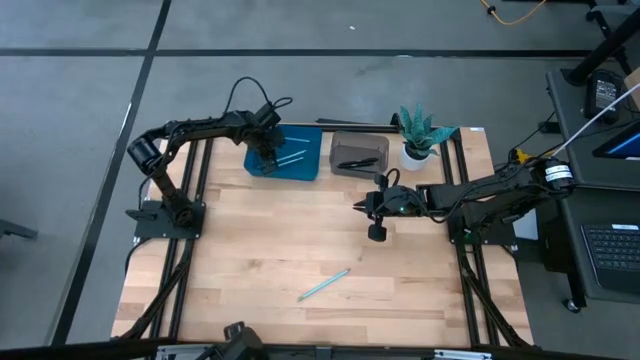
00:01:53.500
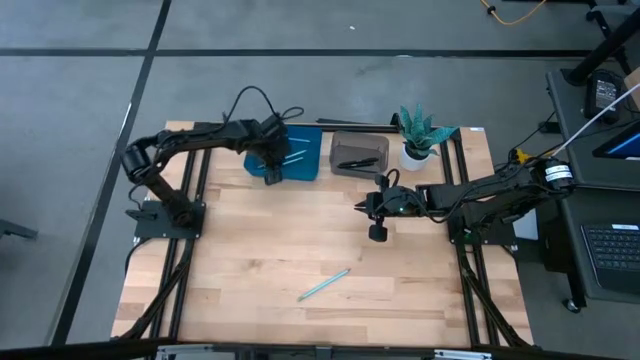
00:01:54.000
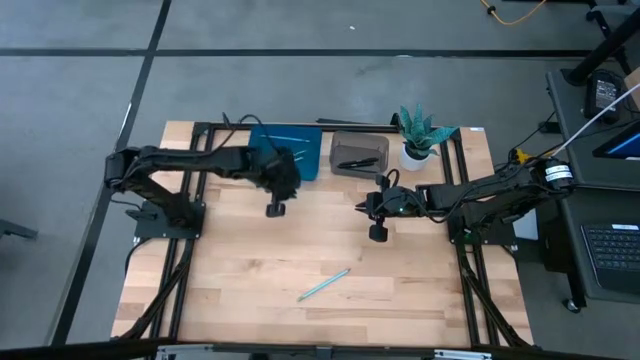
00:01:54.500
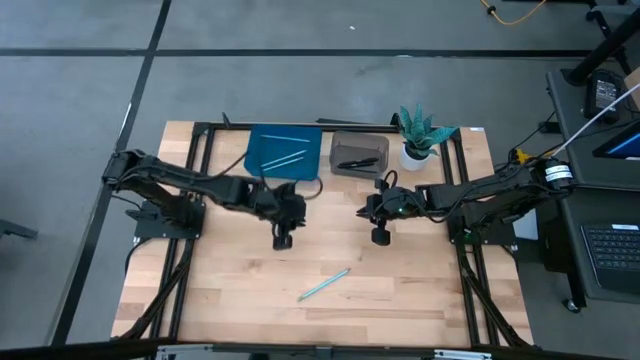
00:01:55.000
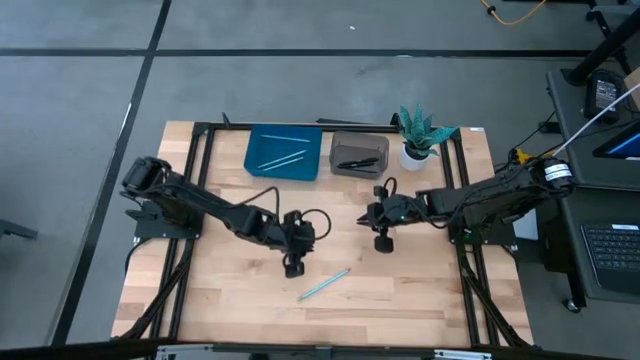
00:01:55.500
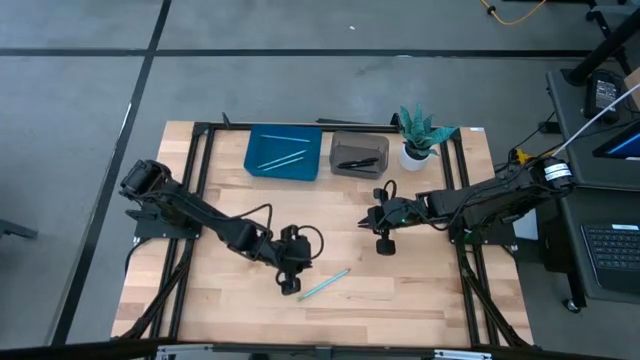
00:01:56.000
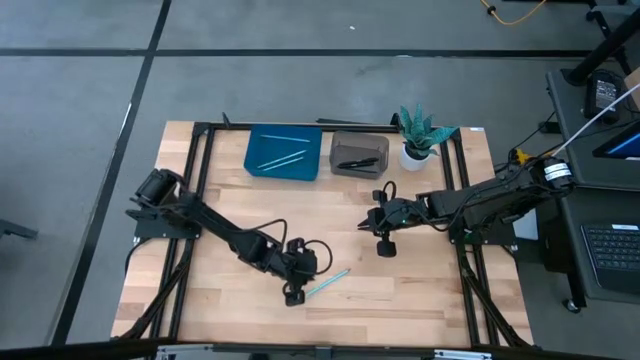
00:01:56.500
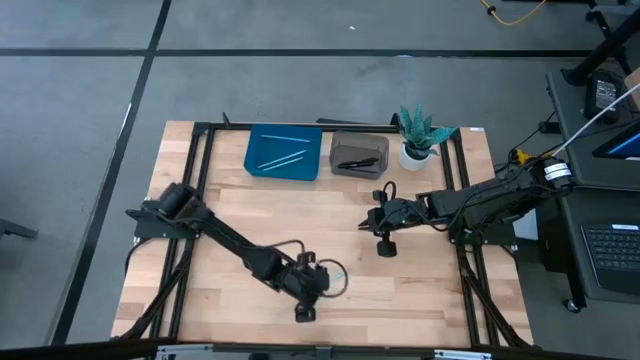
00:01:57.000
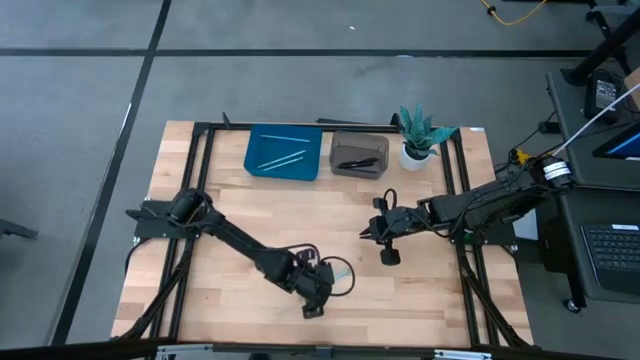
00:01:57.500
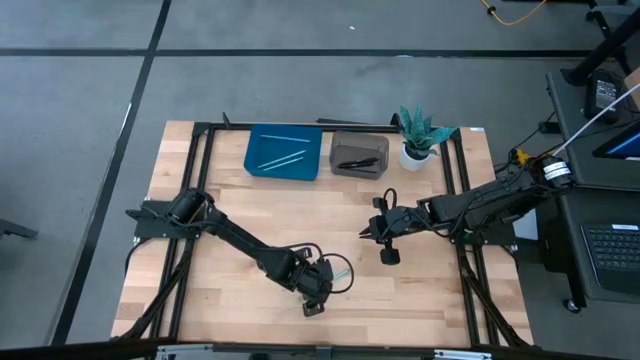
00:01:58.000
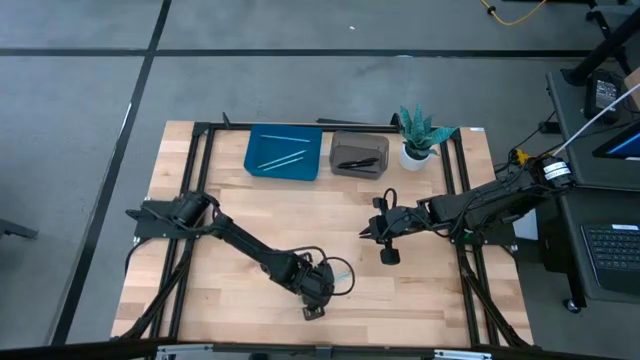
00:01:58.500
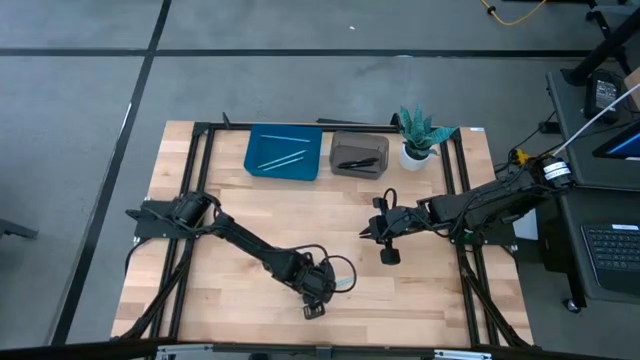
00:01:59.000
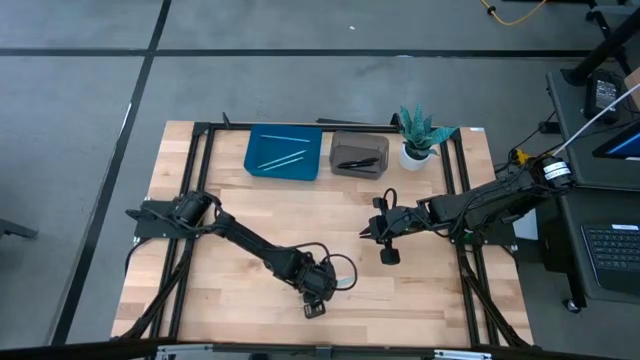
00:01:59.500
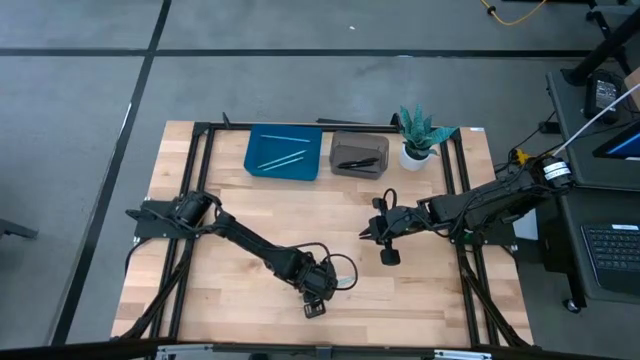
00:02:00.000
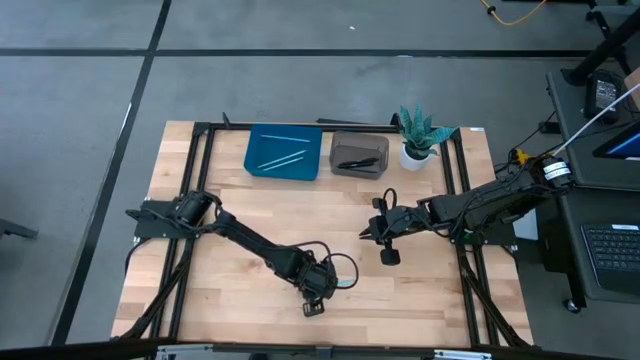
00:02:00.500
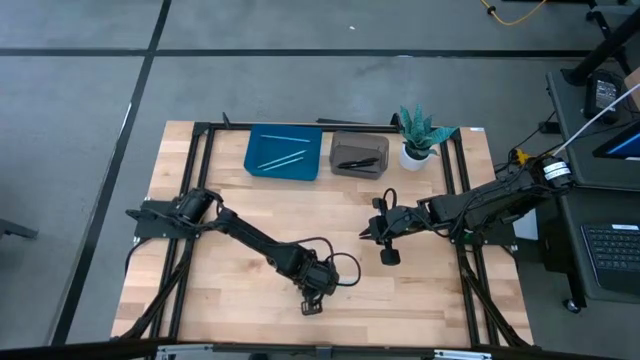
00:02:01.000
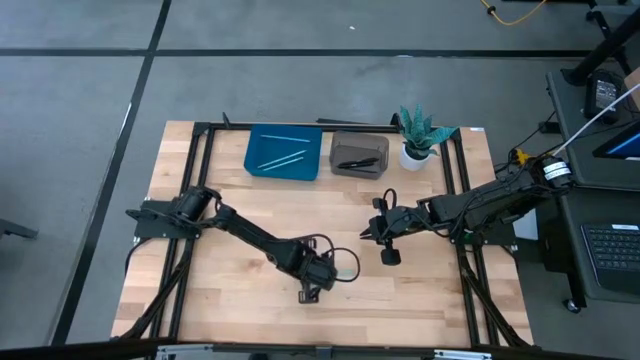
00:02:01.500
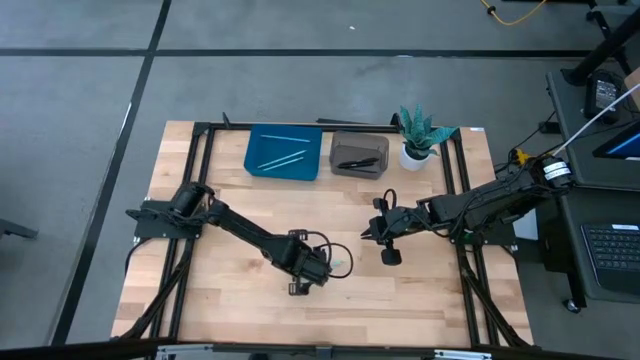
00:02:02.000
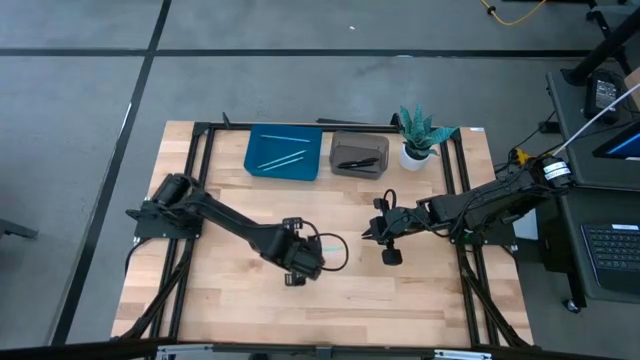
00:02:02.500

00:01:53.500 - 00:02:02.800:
Task: Sort pens & pencils
Put the light green pencil into the blue bin

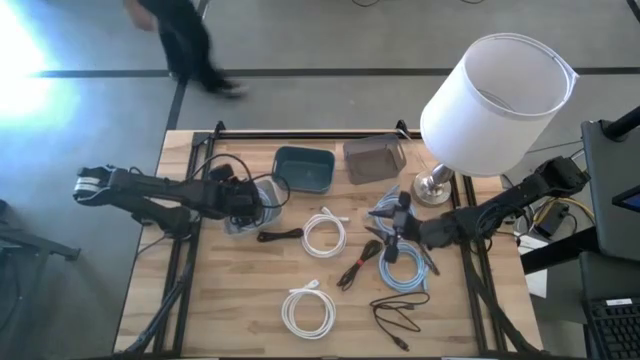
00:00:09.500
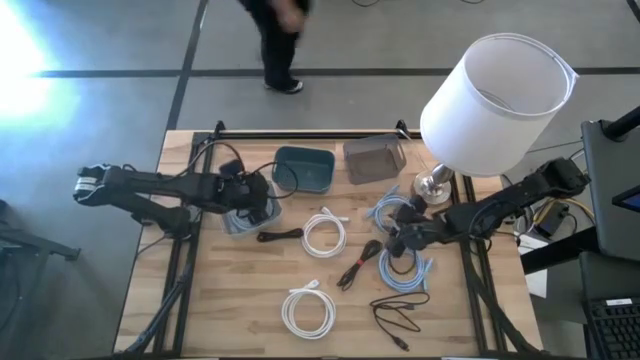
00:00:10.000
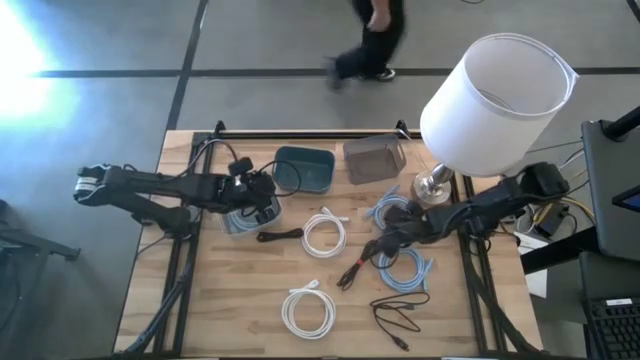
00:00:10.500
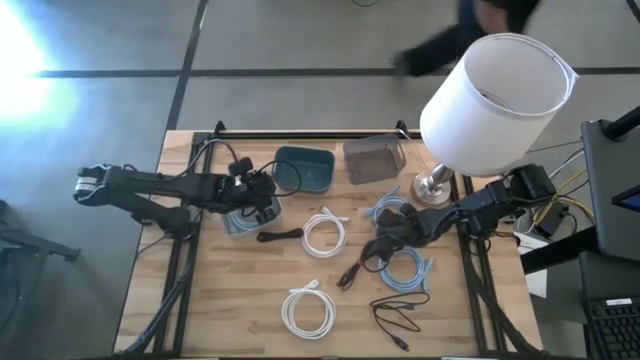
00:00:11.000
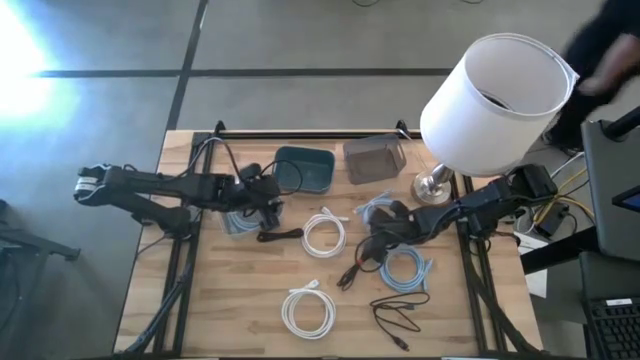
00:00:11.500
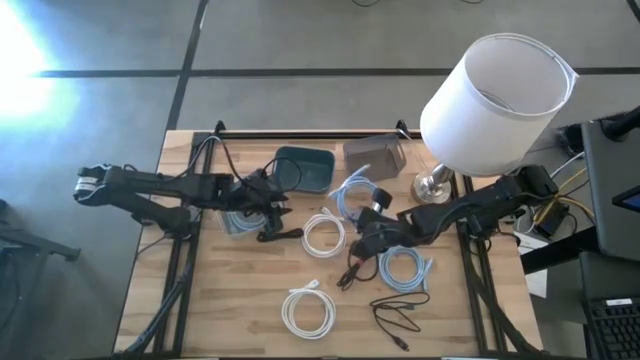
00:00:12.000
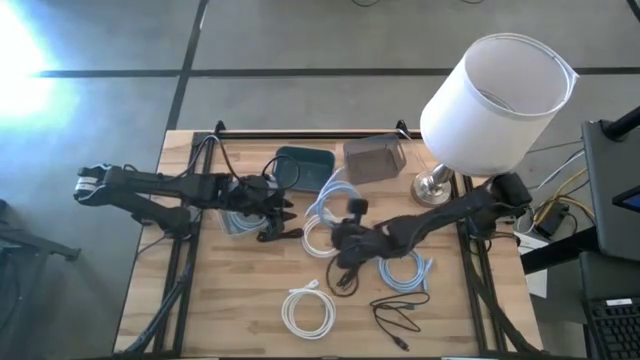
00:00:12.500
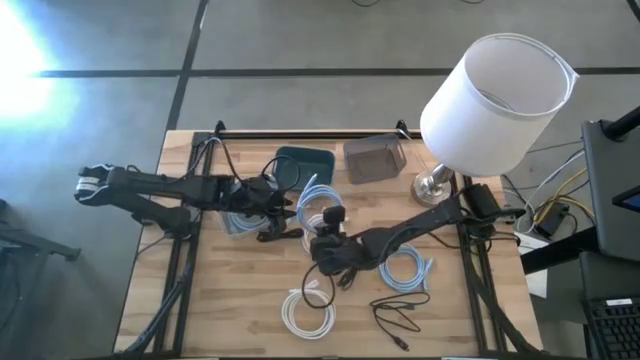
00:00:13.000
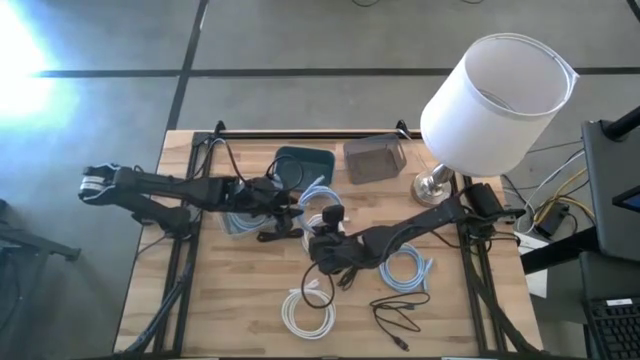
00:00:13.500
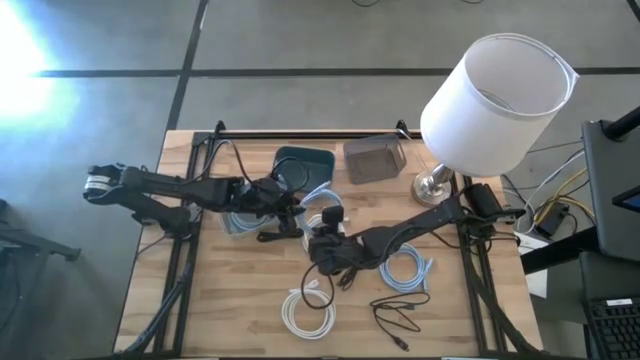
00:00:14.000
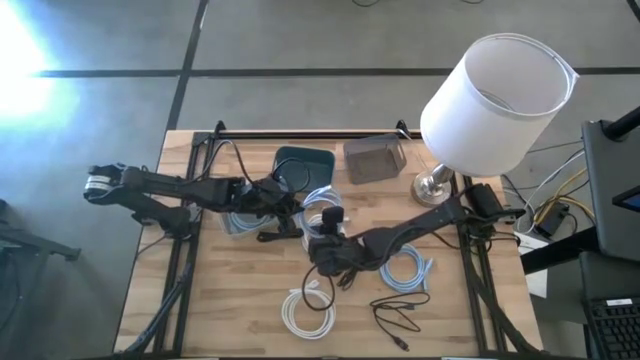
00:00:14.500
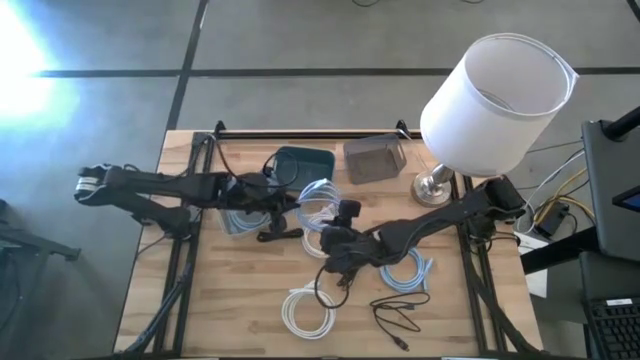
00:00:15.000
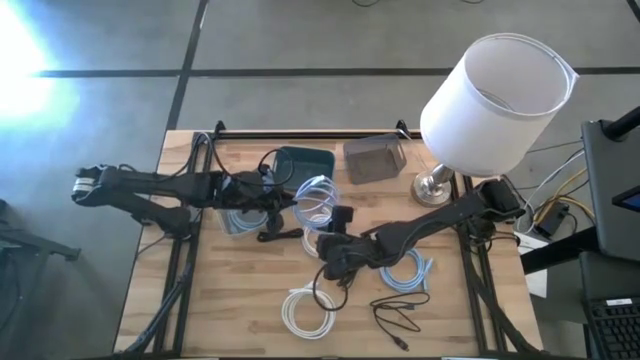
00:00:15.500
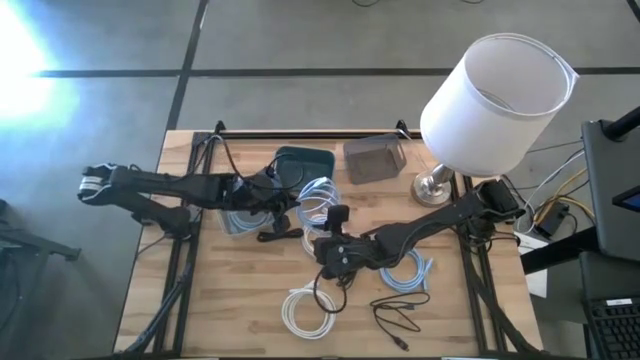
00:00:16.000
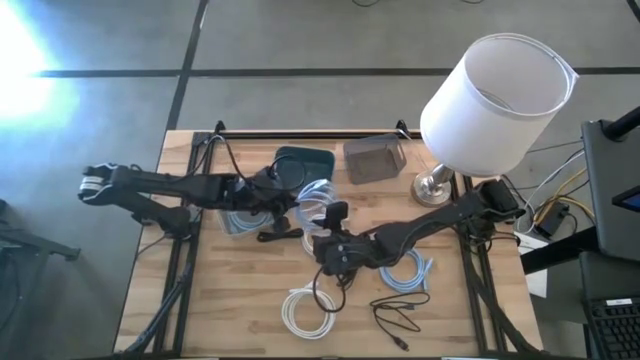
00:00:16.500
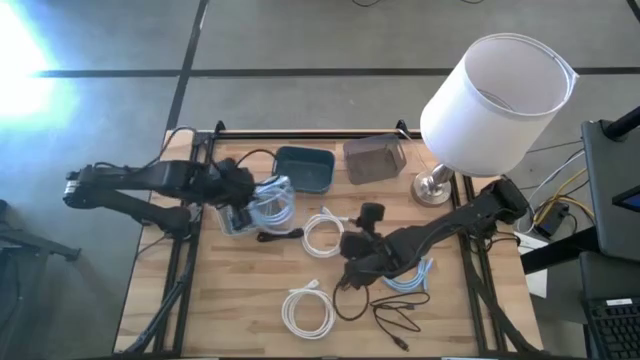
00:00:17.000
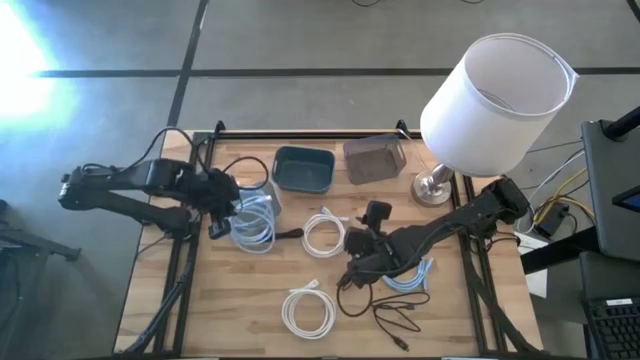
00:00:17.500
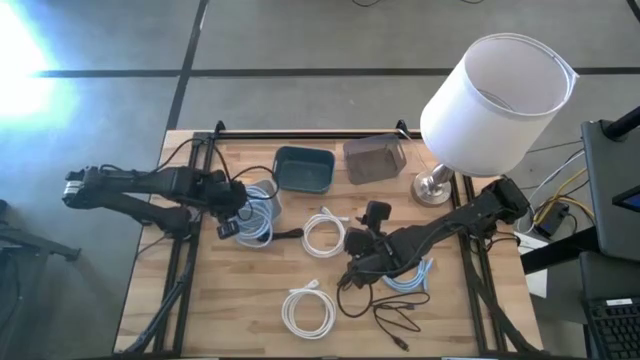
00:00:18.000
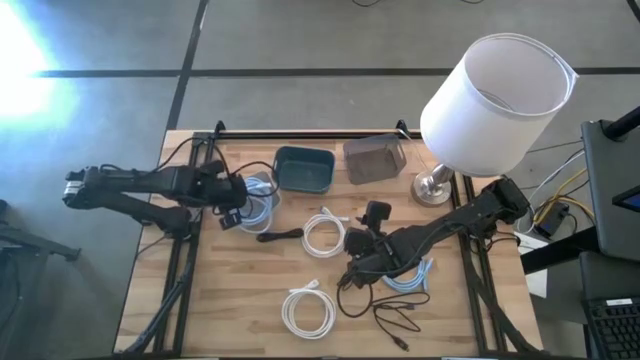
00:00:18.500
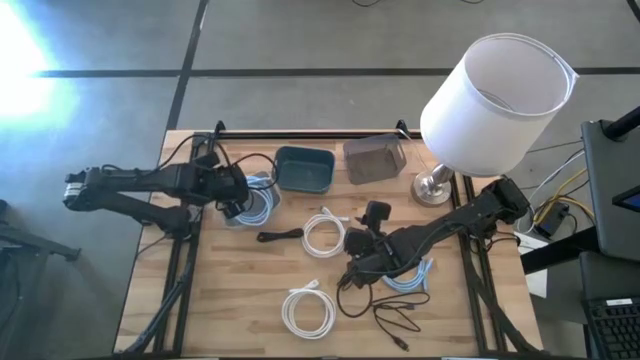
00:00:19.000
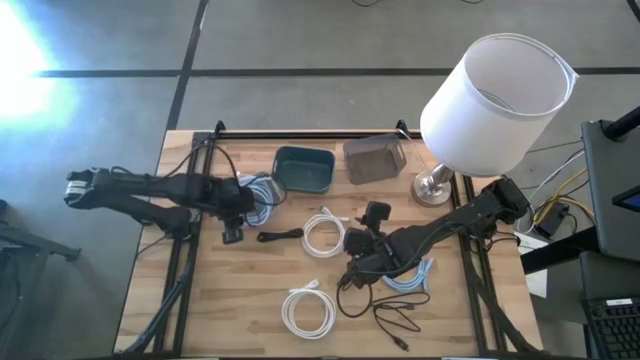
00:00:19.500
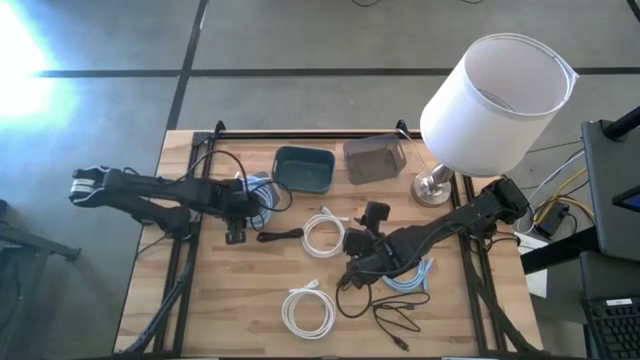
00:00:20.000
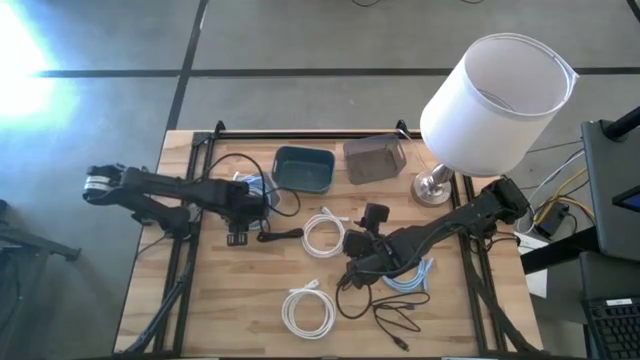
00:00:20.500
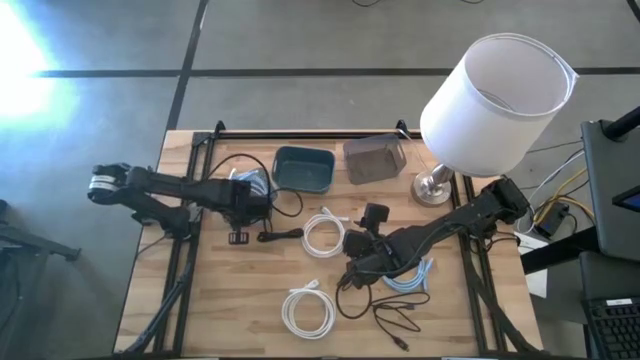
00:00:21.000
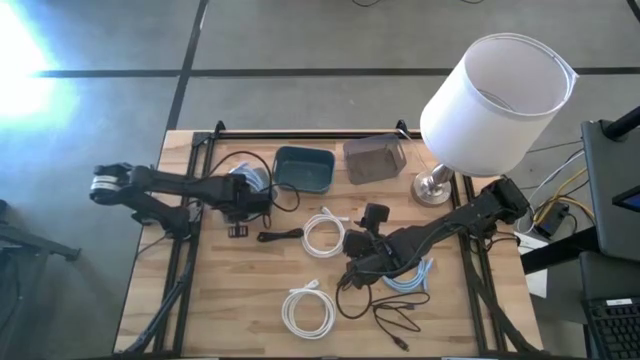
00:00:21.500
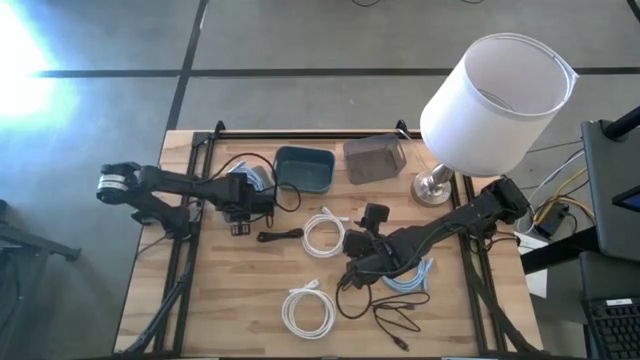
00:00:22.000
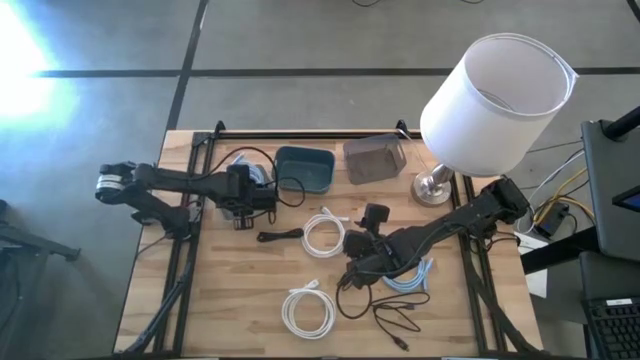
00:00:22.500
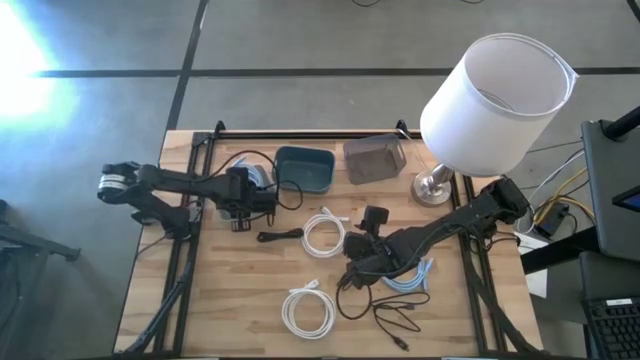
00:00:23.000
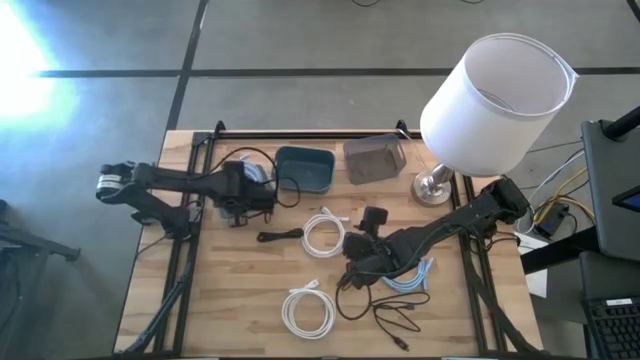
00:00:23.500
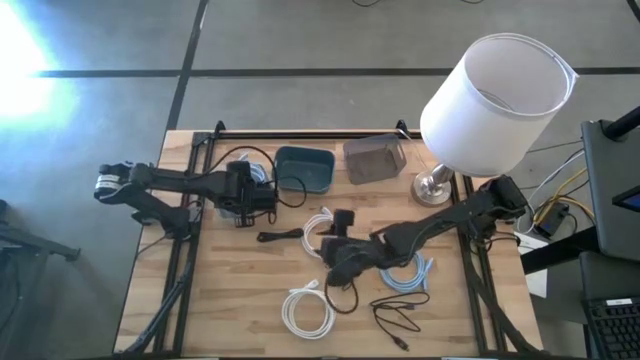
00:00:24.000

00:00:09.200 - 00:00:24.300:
Task: Pick & Place USB Port
Put the top light blue HDMI cable into the white bin
